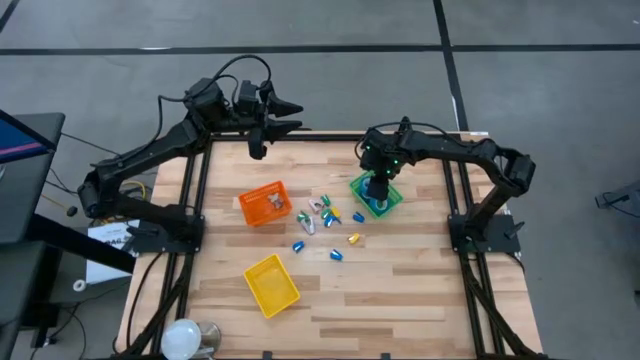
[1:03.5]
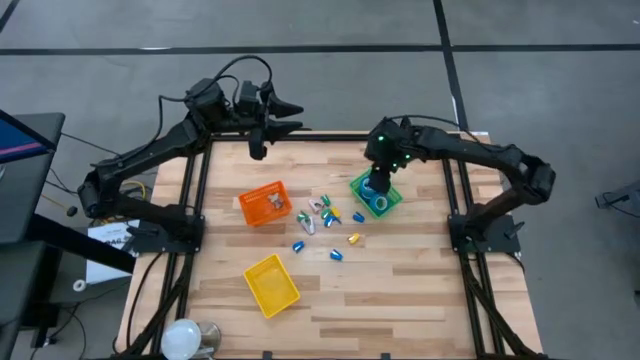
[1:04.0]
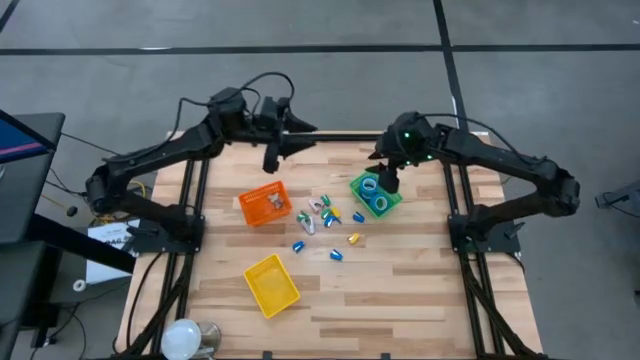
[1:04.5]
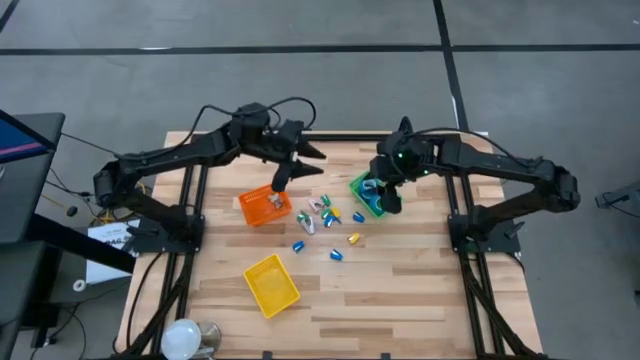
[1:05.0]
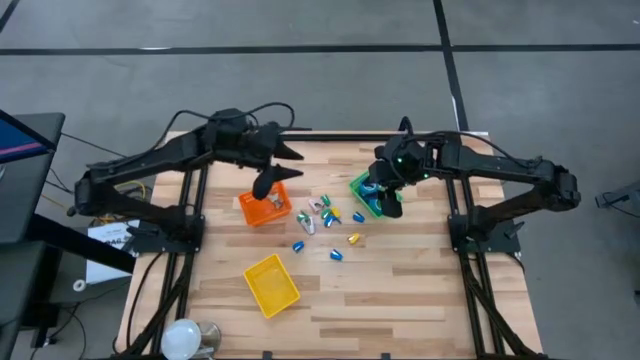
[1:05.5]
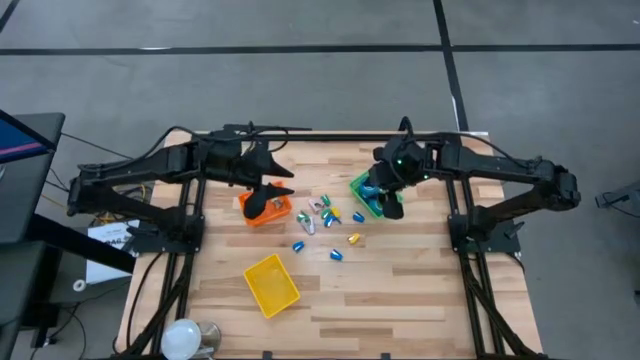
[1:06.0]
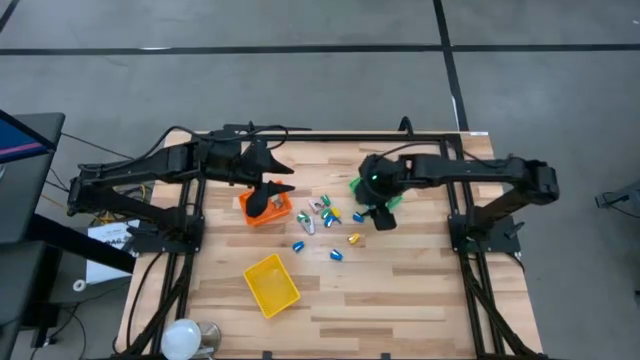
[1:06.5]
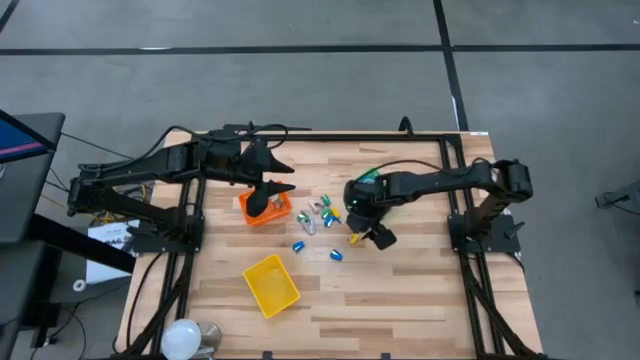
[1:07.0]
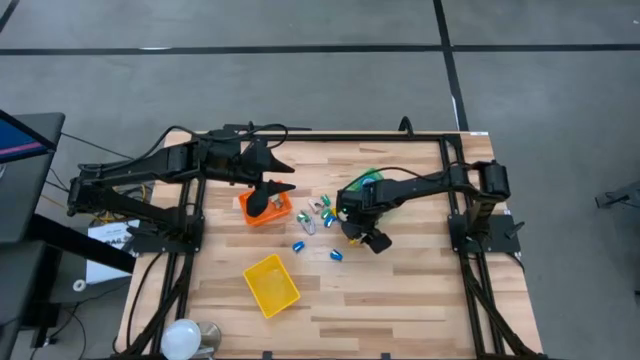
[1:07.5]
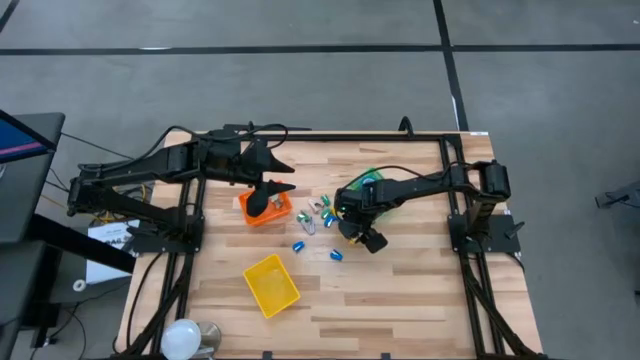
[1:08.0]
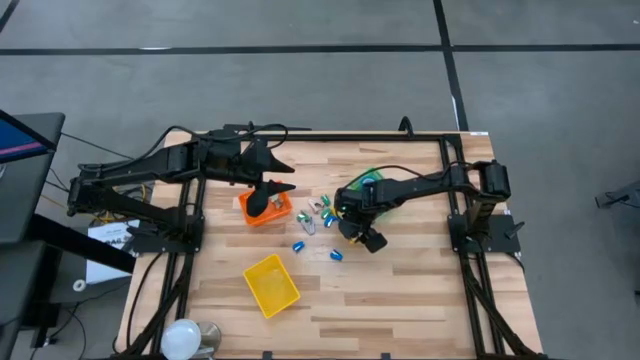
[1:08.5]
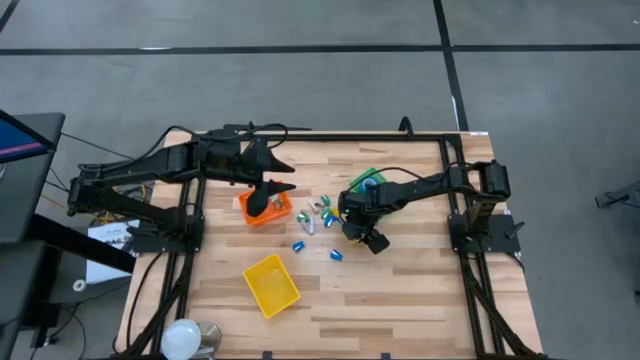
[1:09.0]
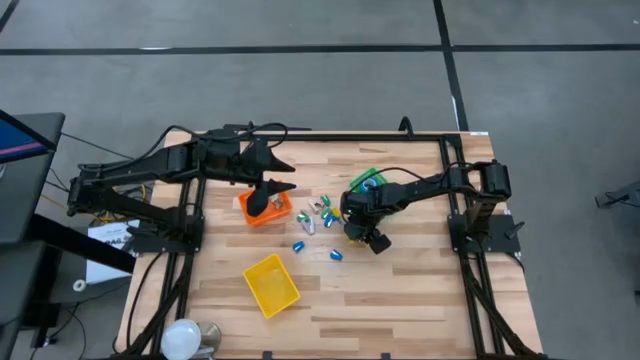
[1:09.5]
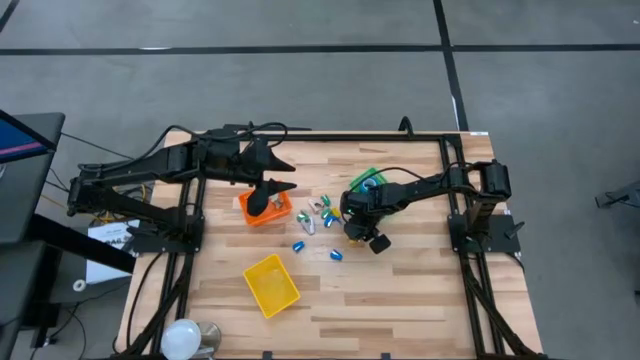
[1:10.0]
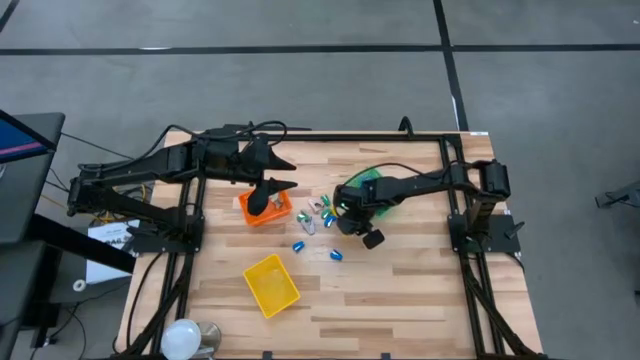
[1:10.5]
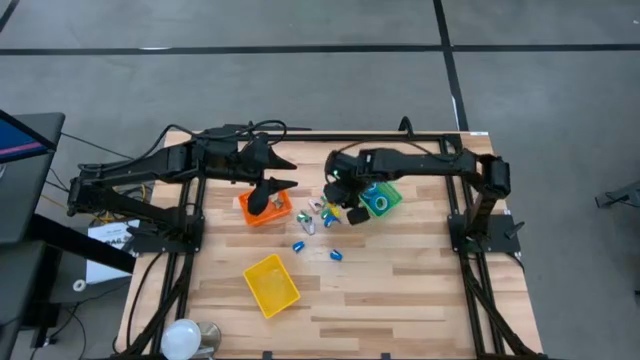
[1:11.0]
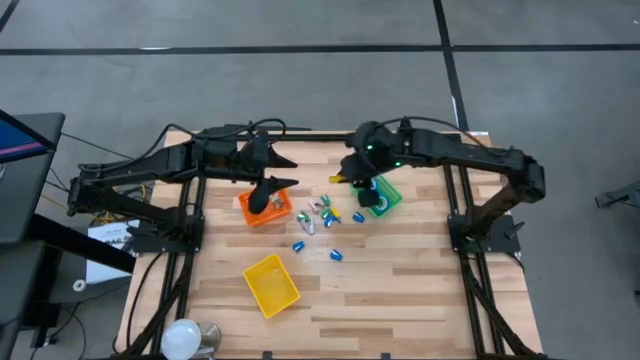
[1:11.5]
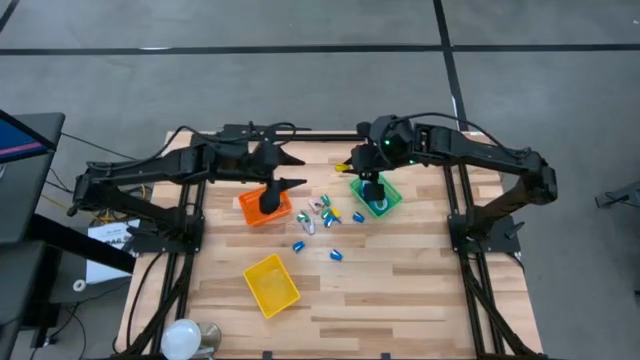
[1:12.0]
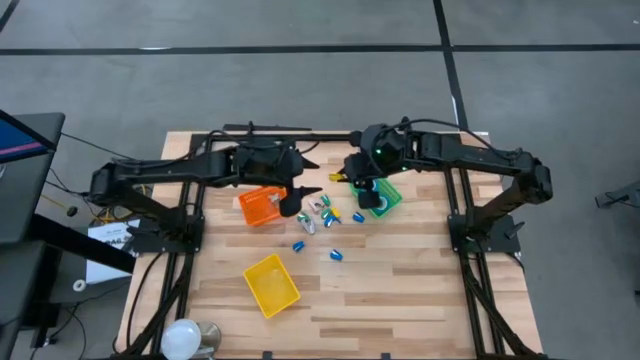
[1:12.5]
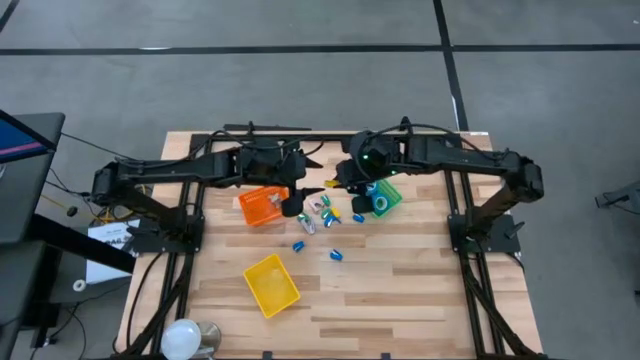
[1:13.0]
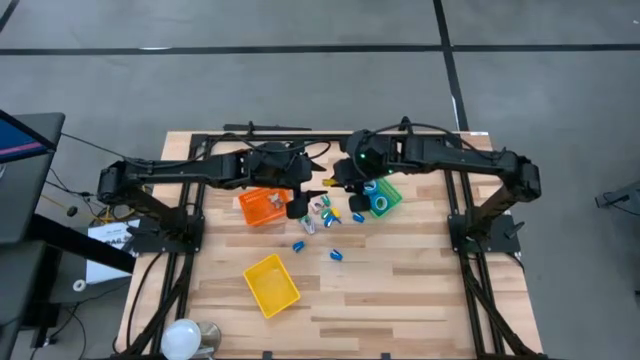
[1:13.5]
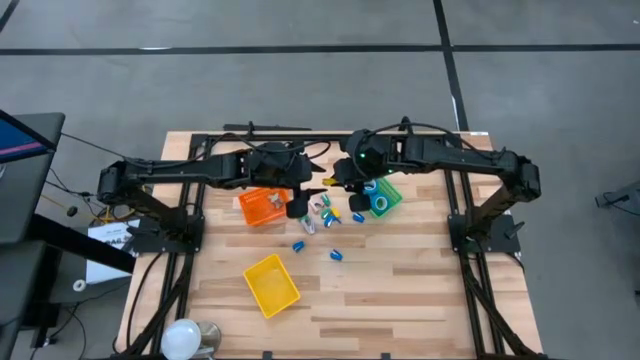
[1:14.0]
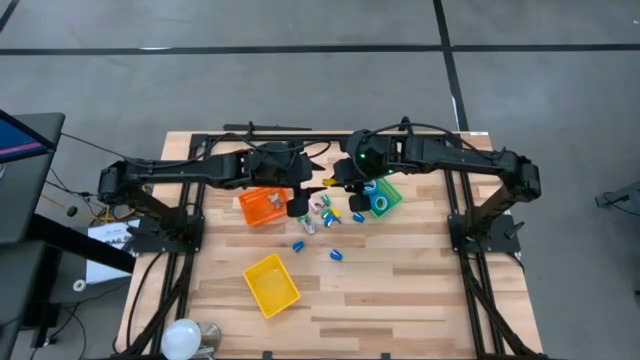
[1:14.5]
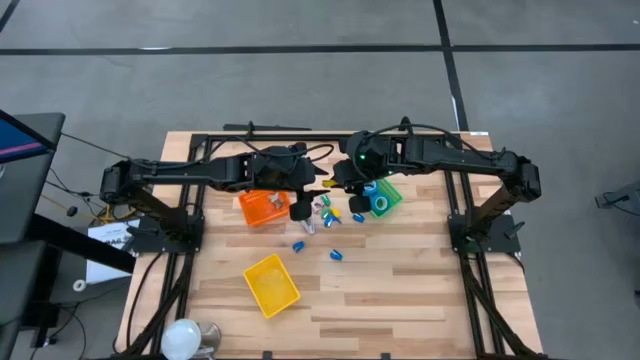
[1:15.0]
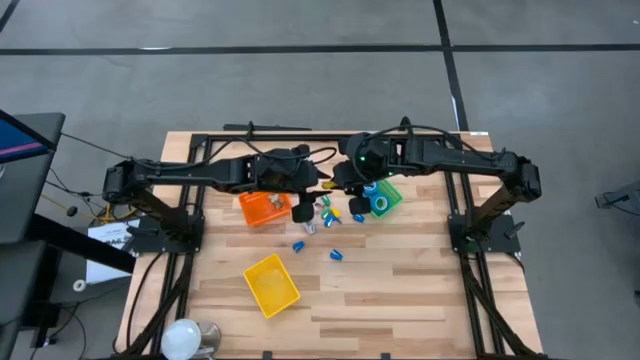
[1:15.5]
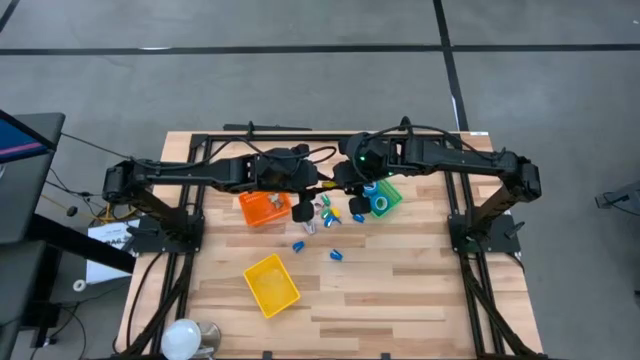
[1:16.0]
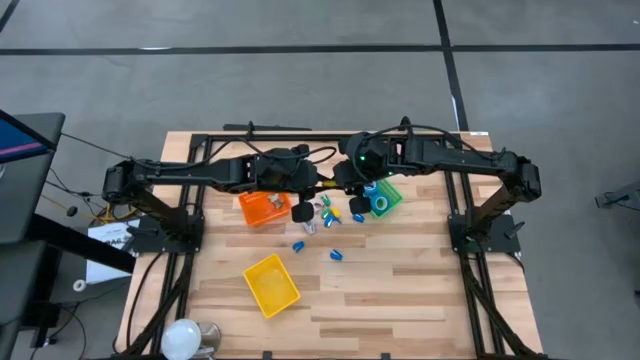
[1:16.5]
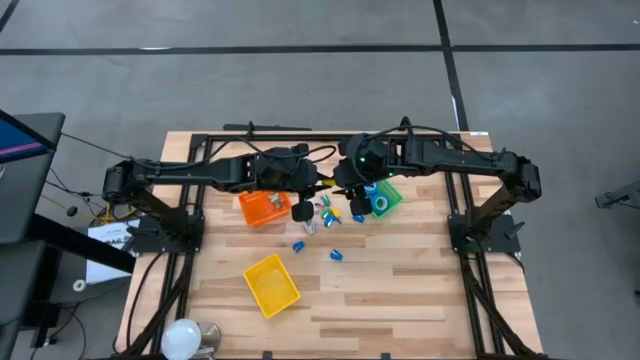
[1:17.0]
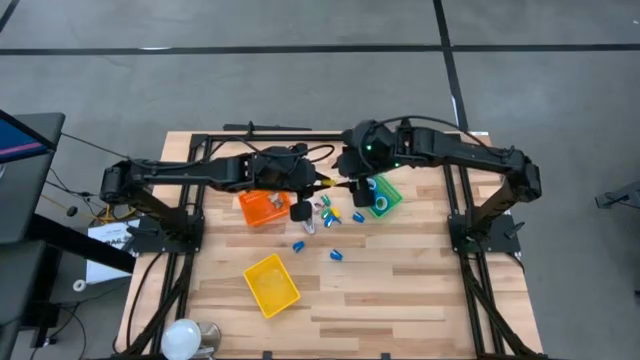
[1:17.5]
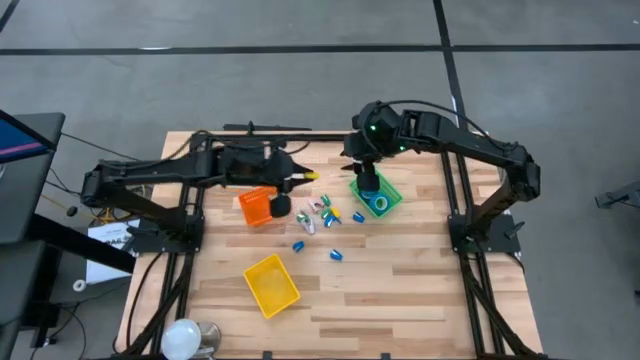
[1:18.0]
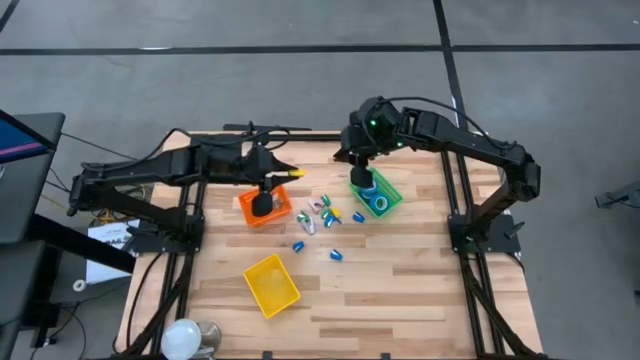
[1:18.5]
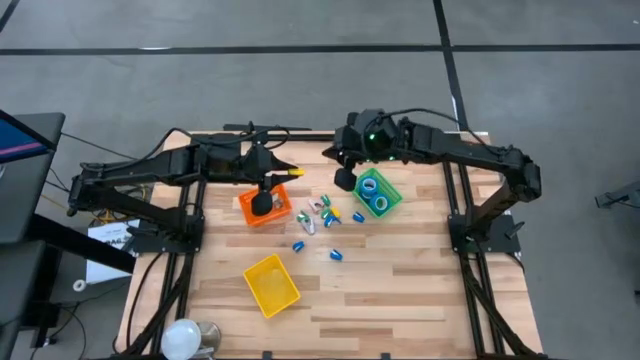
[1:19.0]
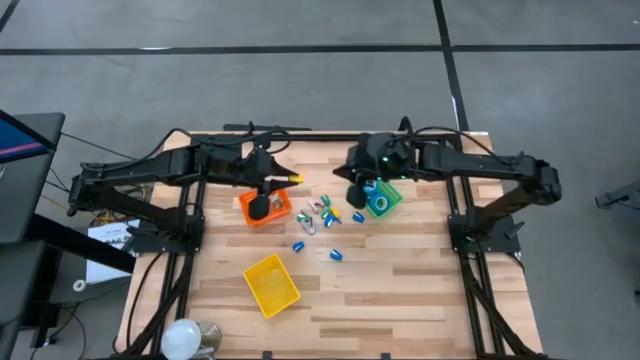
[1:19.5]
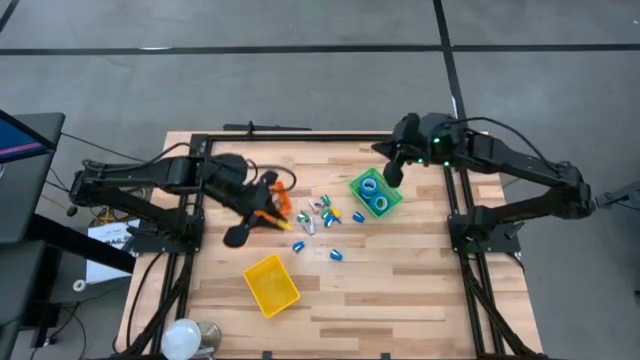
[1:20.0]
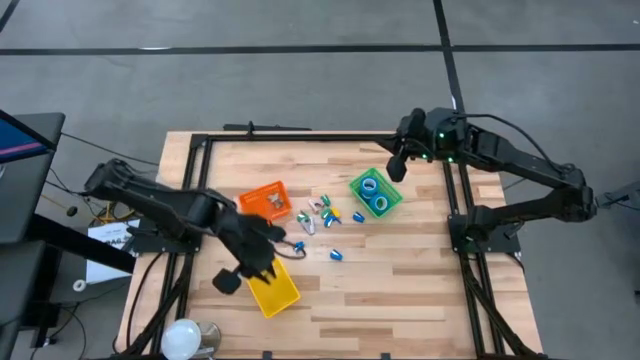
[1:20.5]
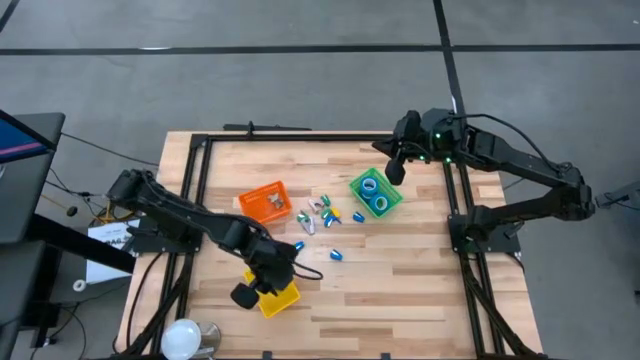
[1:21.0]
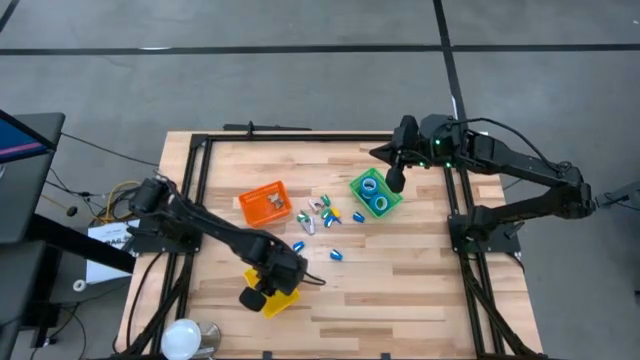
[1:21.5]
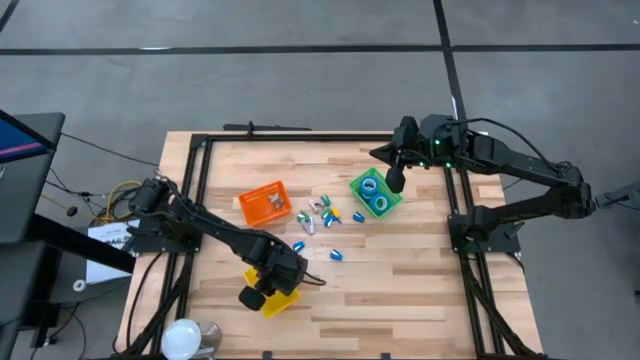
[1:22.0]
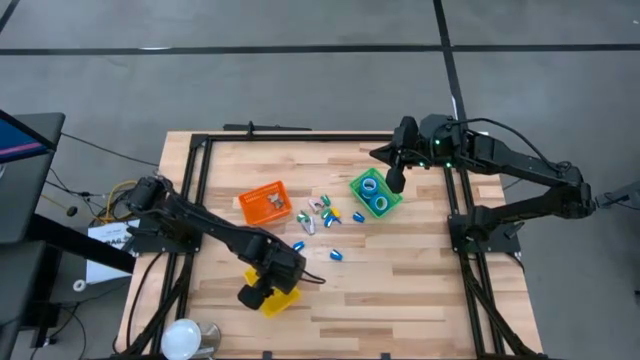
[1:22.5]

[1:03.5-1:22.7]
Task: Pick and place Stapler, Stapler remover, tape
Put the yellow stapler into the yellow basket
